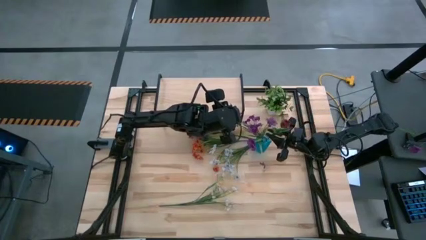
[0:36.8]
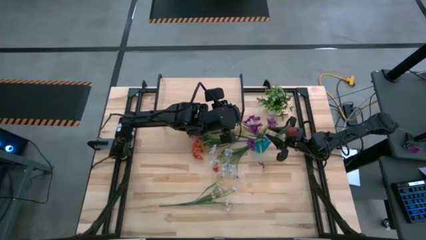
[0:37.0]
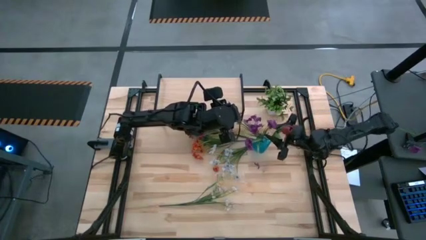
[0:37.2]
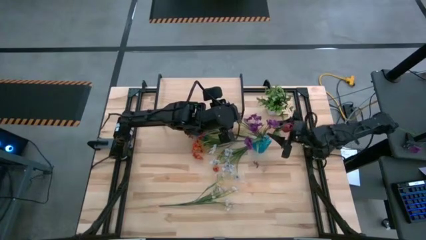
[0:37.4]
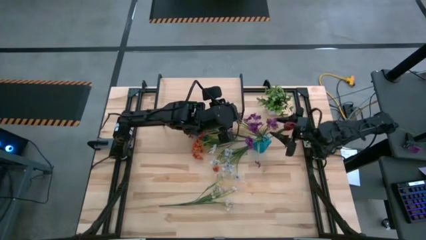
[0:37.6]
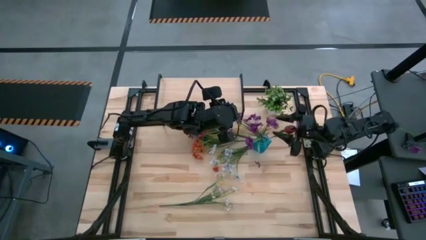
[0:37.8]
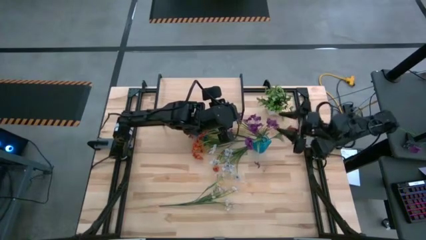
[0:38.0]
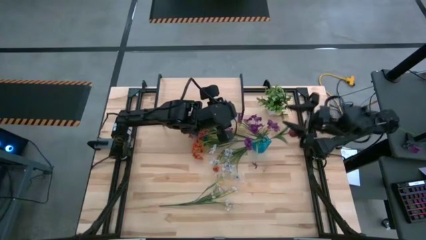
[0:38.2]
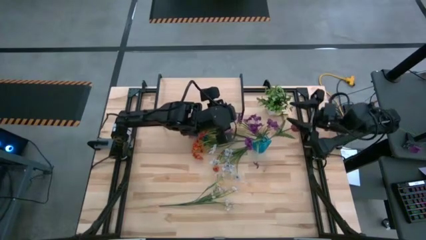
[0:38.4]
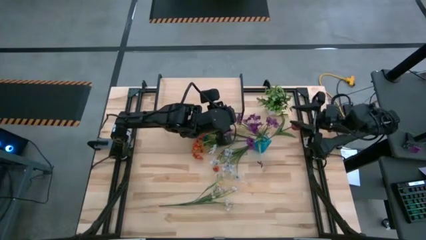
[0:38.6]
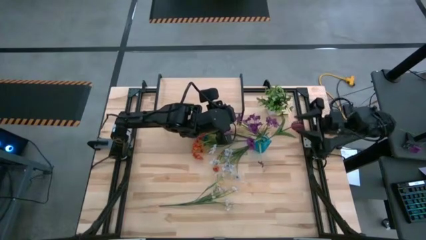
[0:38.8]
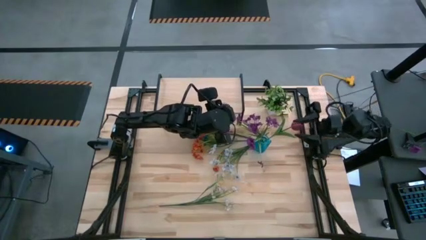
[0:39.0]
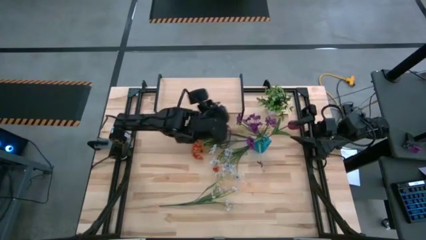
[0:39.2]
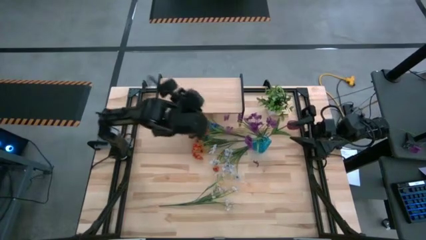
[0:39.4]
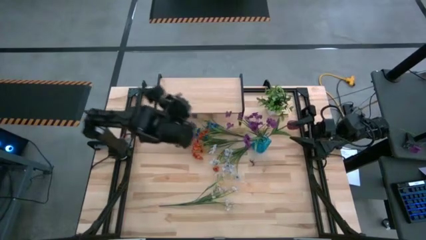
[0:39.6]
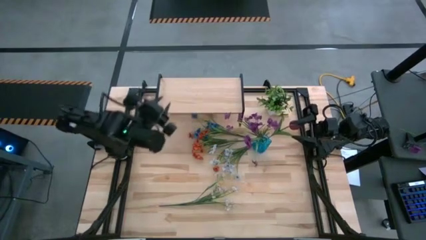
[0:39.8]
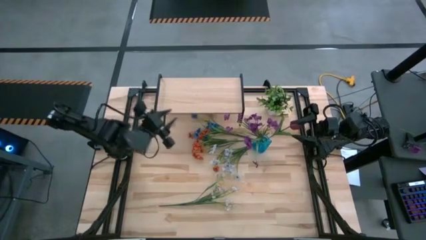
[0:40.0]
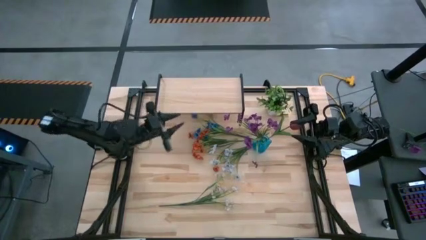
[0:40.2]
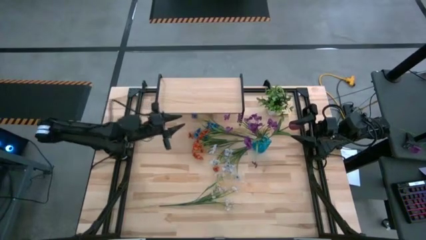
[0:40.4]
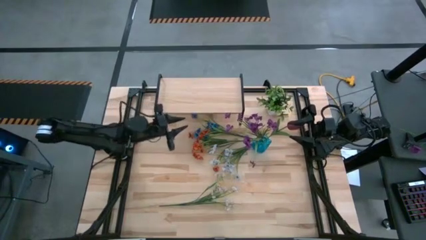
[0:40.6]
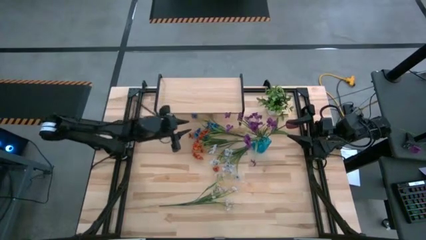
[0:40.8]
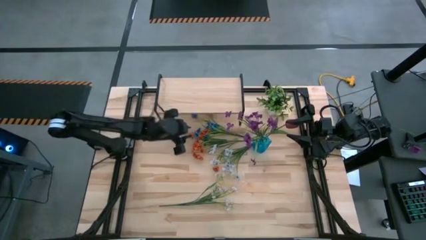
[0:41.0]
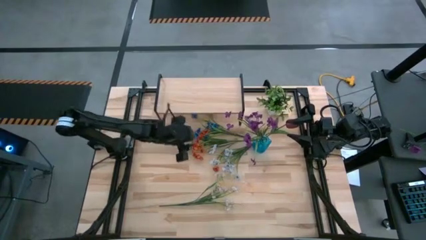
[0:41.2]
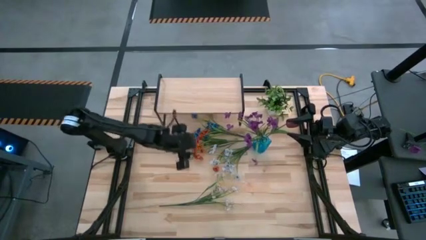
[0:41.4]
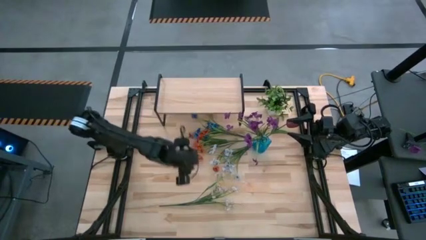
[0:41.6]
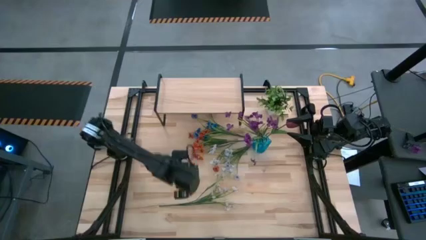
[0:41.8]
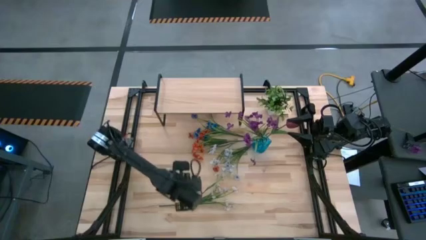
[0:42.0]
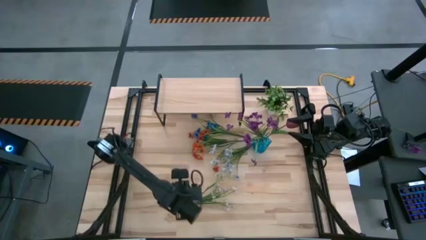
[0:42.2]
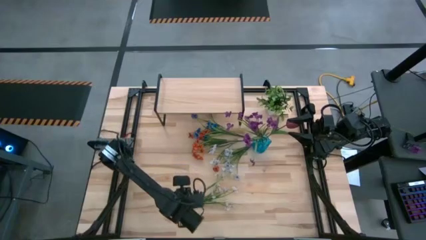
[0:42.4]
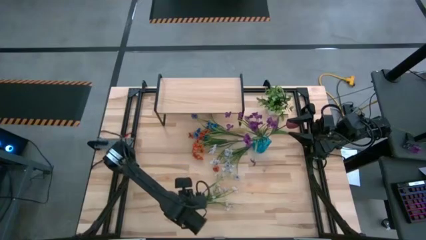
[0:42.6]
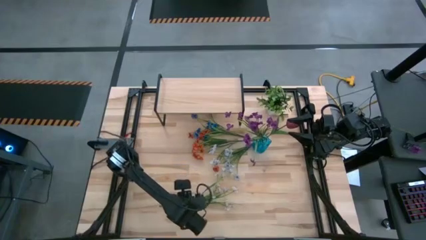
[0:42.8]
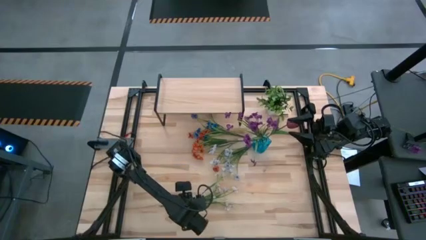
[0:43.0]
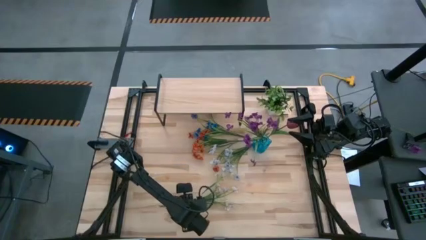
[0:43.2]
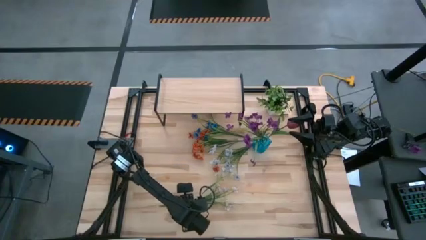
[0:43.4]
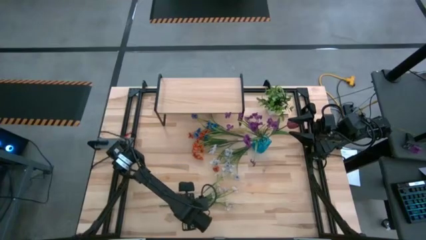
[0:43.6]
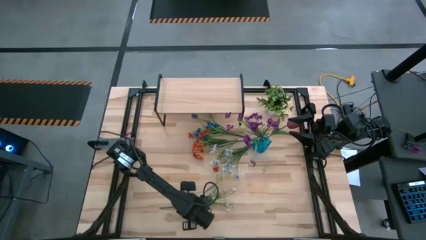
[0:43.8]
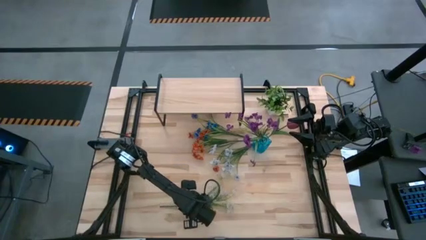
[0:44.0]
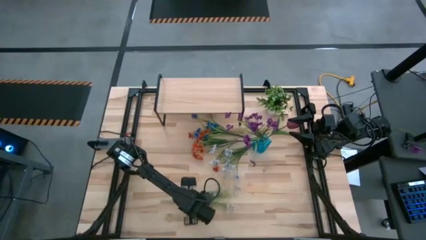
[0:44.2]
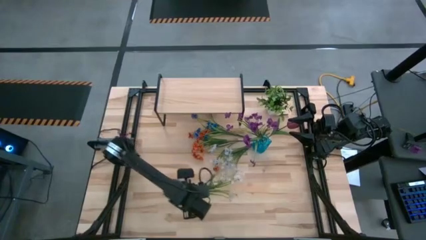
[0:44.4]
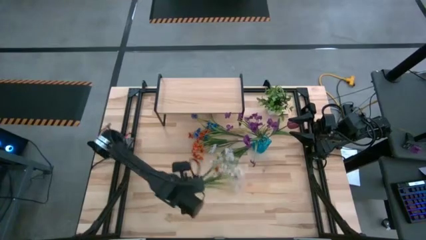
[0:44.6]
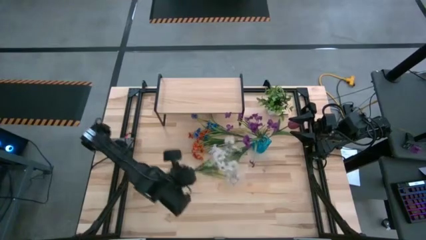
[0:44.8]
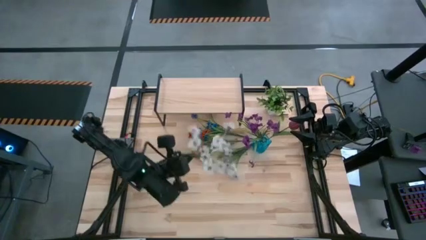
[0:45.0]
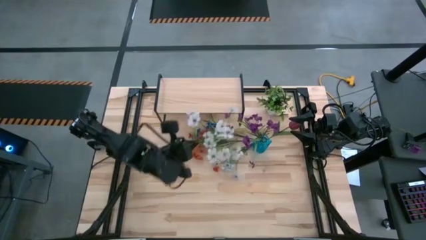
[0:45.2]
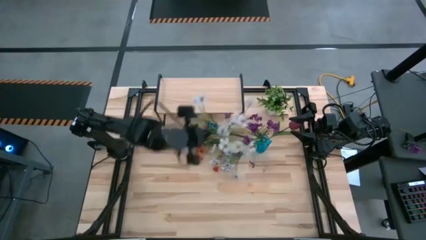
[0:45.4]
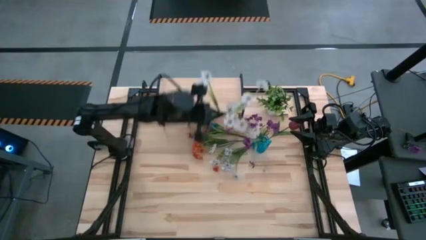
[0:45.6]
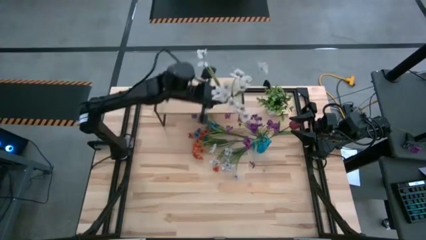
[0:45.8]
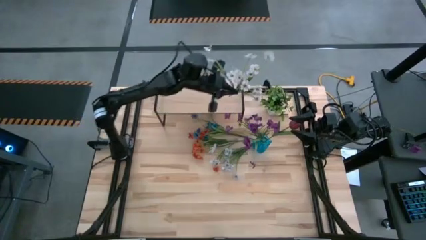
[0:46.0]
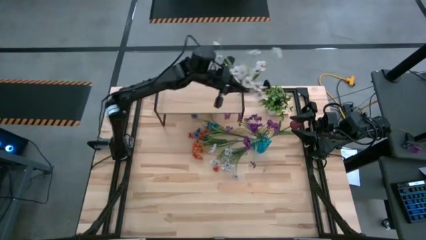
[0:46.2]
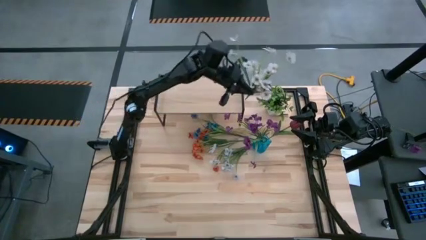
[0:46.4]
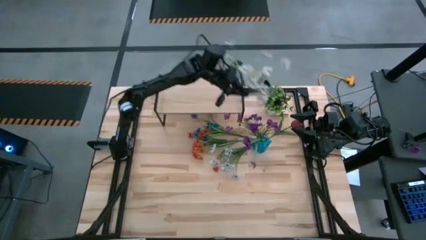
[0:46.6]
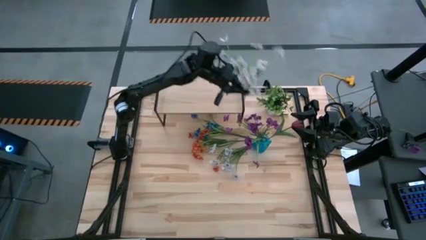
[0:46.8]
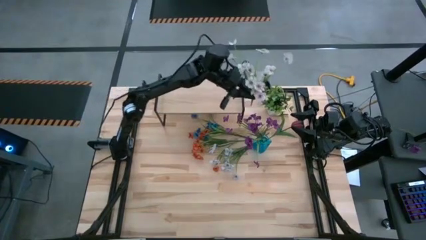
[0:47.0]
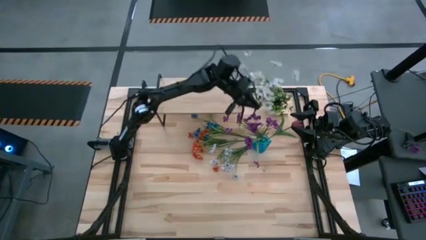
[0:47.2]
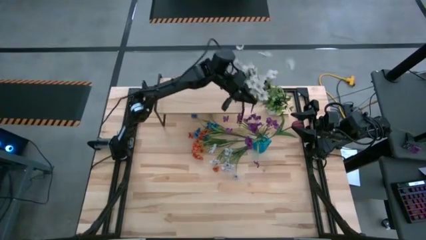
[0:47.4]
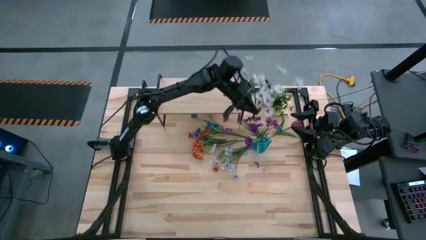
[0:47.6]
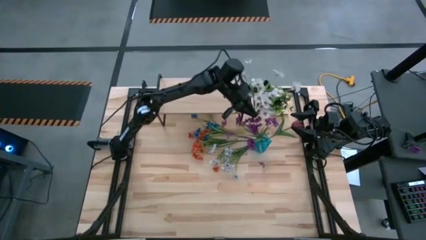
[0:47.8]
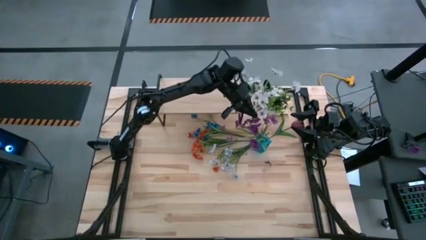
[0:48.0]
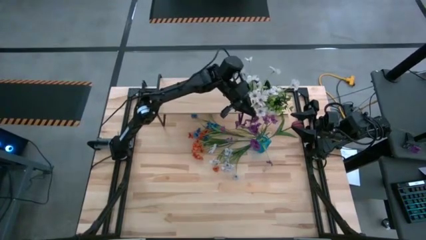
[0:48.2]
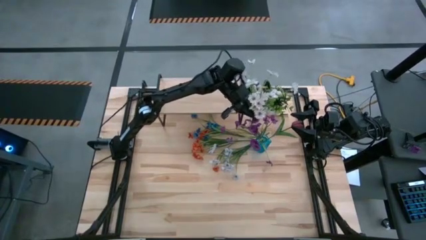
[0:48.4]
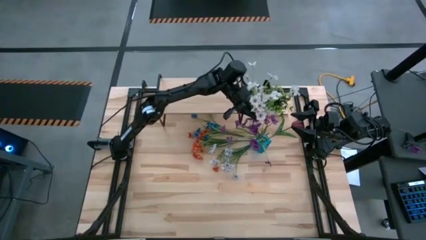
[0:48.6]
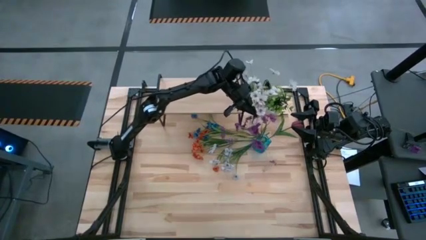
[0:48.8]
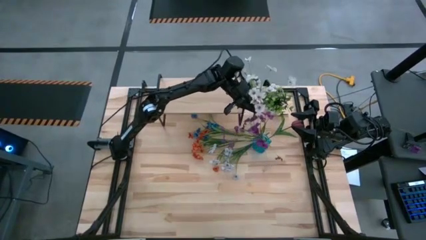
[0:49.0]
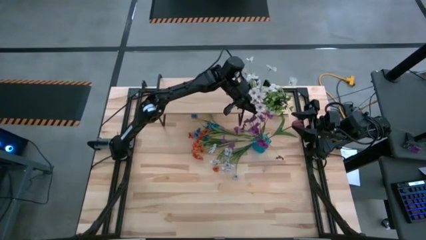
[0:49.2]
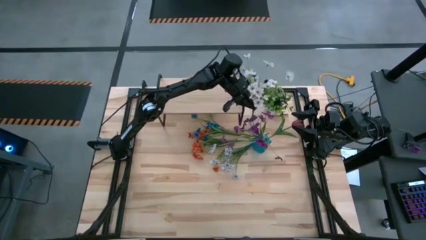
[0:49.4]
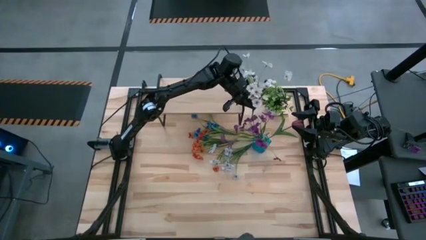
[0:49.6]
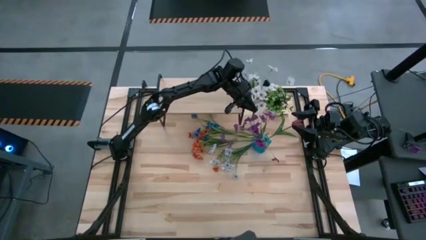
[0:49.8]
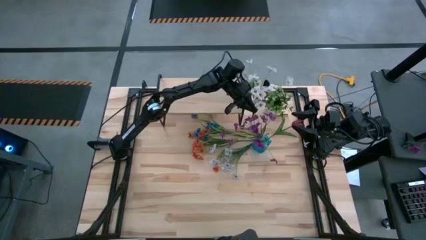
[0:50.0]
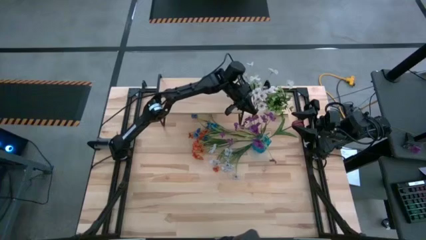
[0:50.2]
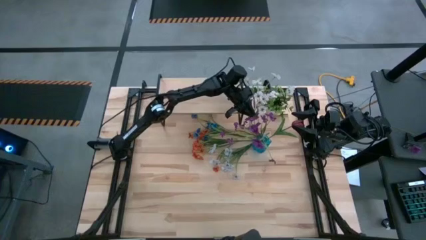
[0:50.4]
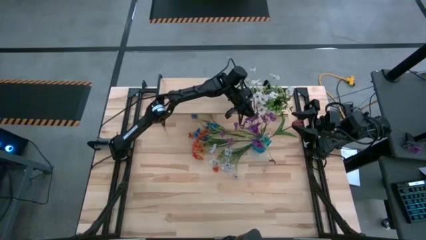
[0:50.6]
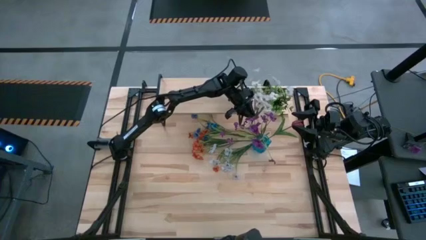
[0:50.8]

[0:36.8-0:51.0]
Task: Pick and place flowers into a vace then onto a shelf
Put the bottom white flowers into the transparent flower vase
